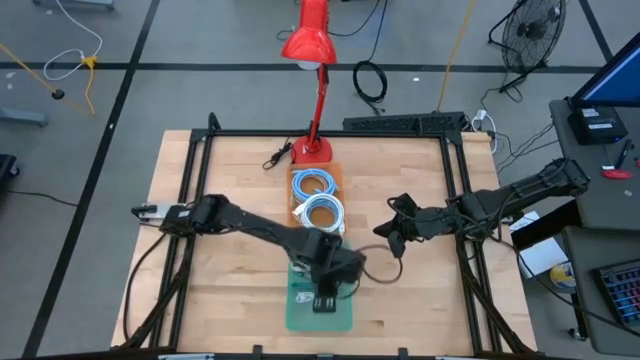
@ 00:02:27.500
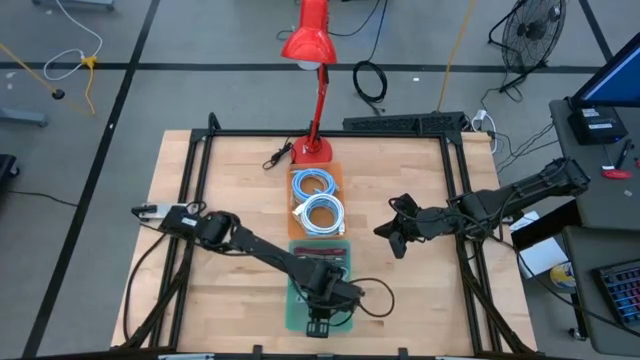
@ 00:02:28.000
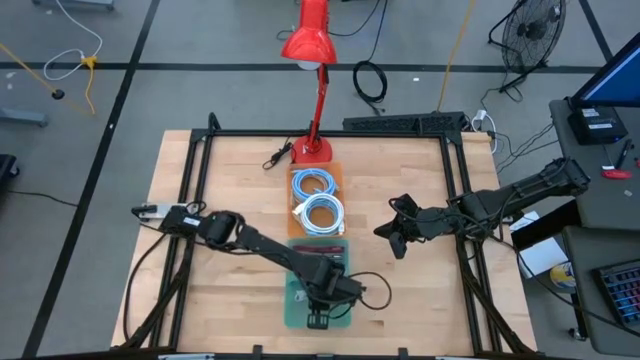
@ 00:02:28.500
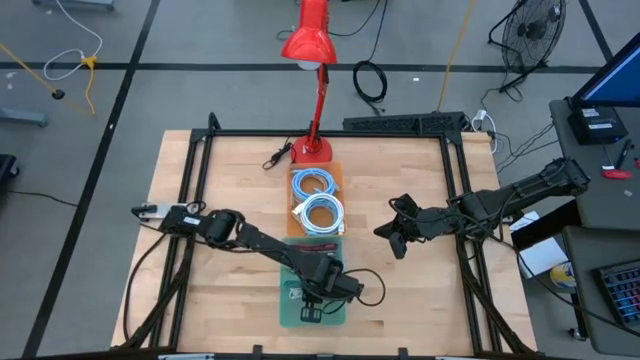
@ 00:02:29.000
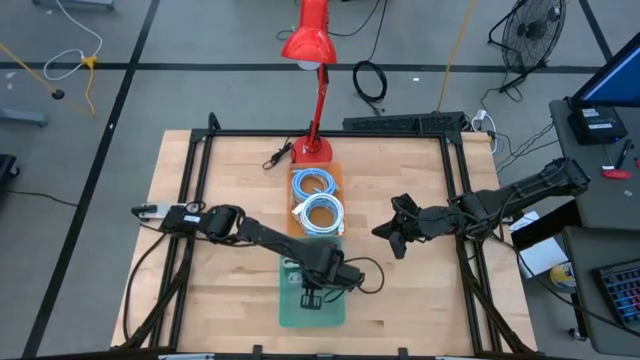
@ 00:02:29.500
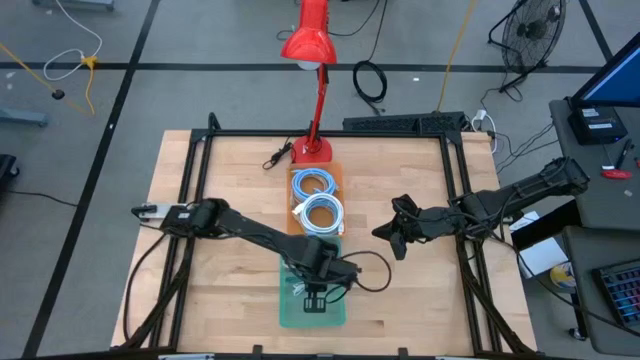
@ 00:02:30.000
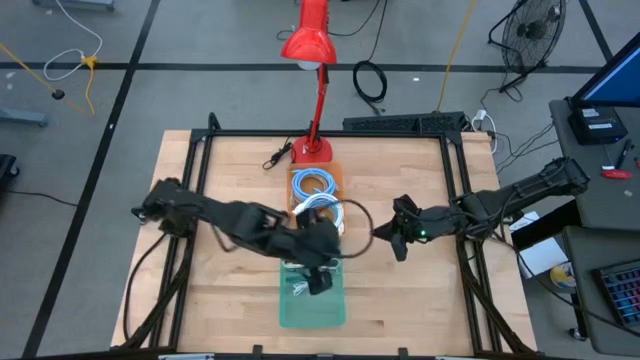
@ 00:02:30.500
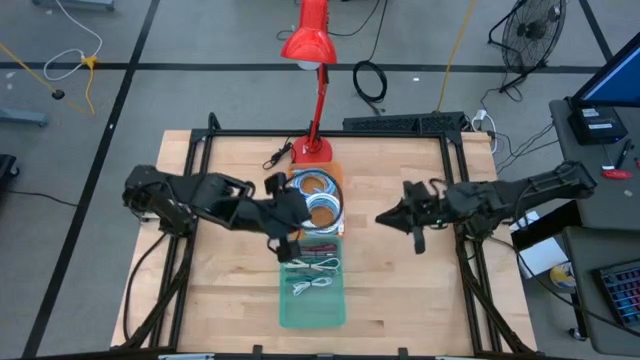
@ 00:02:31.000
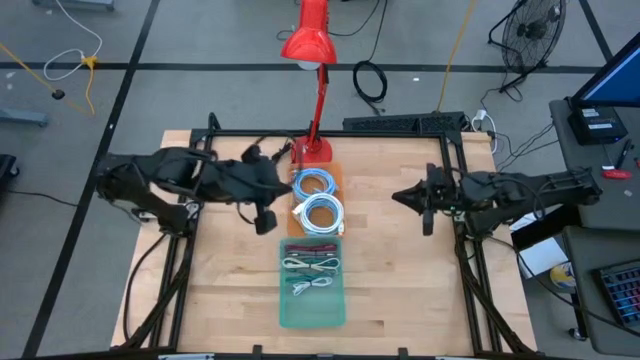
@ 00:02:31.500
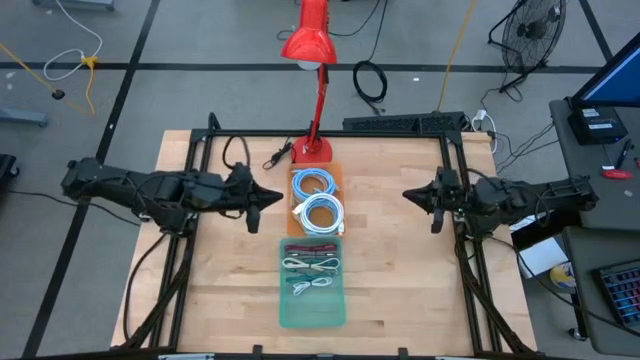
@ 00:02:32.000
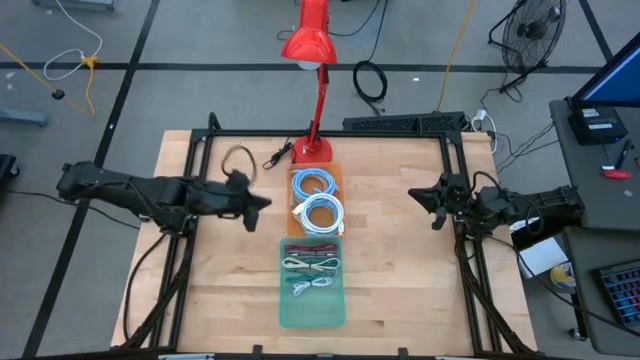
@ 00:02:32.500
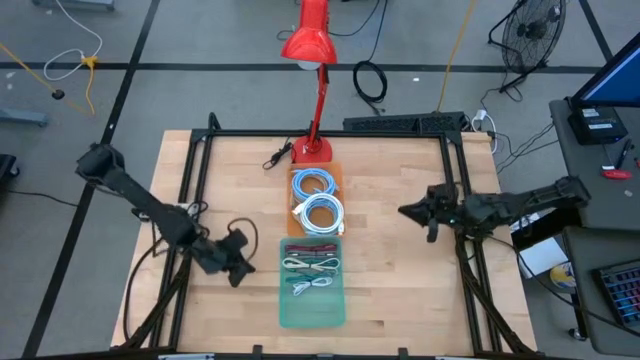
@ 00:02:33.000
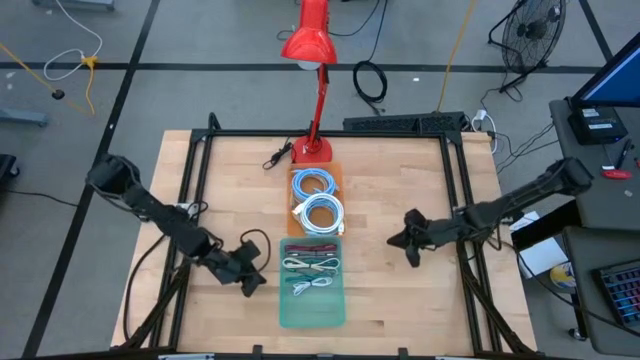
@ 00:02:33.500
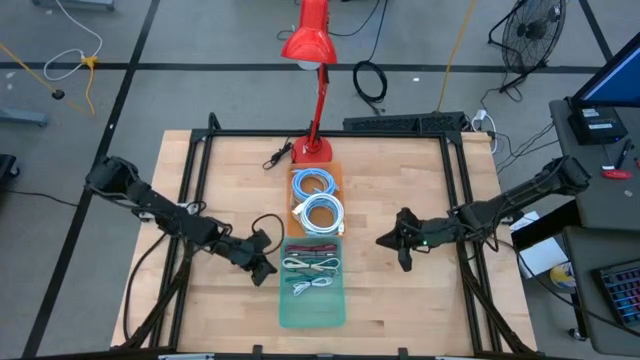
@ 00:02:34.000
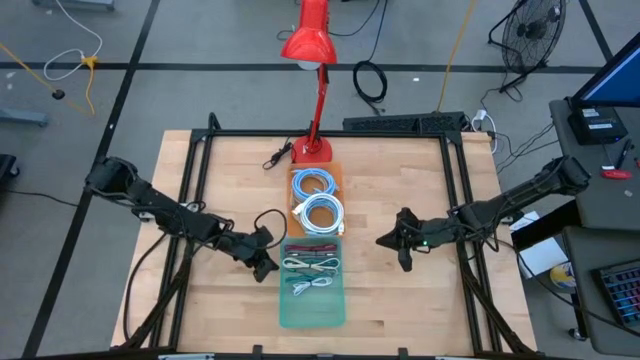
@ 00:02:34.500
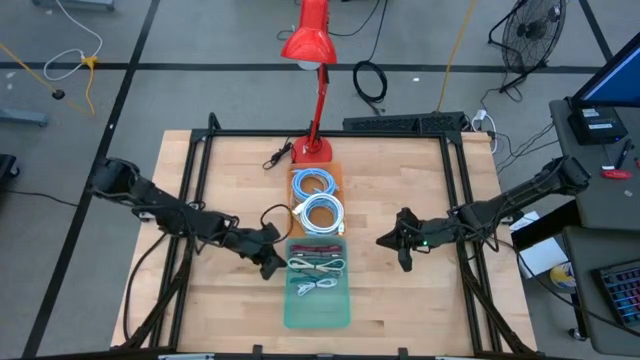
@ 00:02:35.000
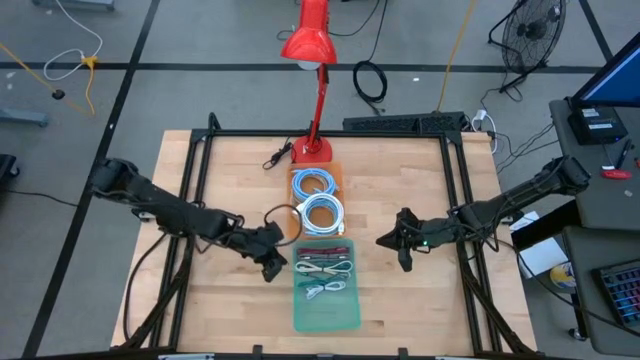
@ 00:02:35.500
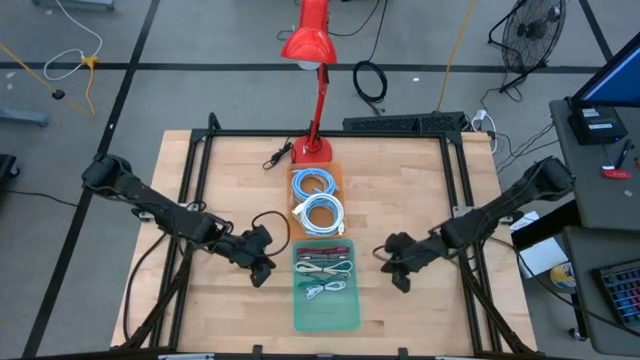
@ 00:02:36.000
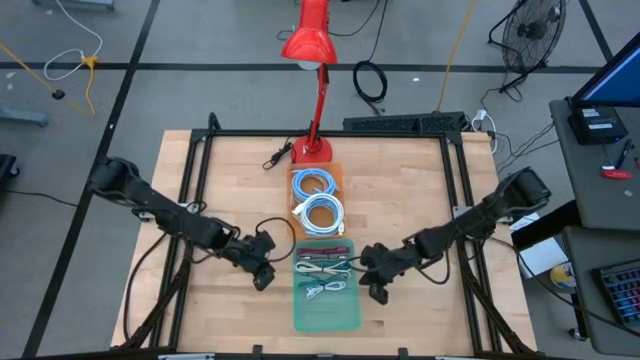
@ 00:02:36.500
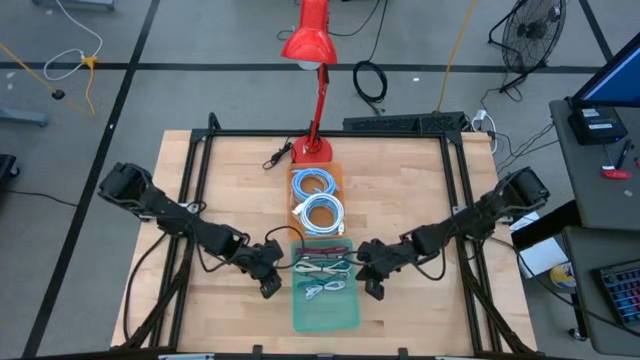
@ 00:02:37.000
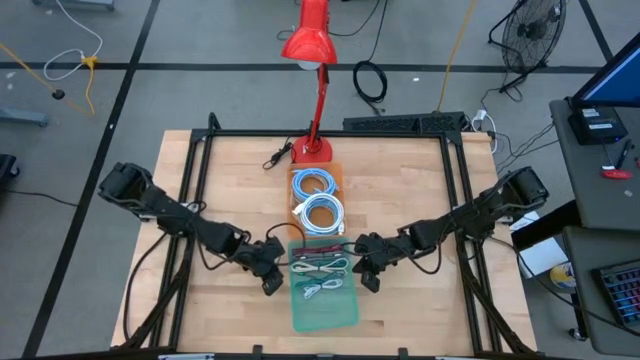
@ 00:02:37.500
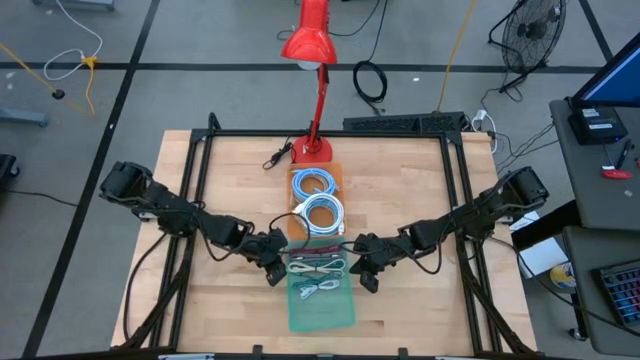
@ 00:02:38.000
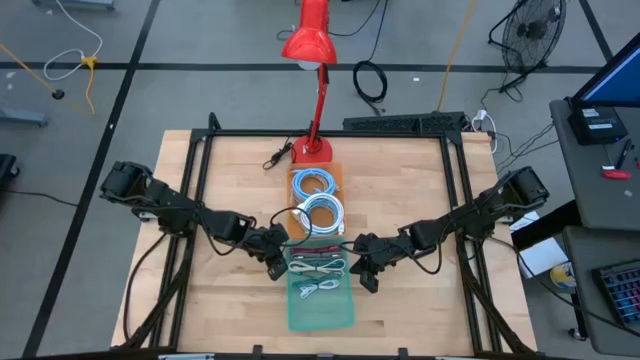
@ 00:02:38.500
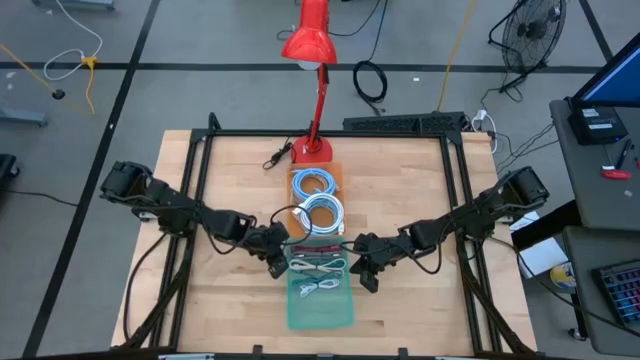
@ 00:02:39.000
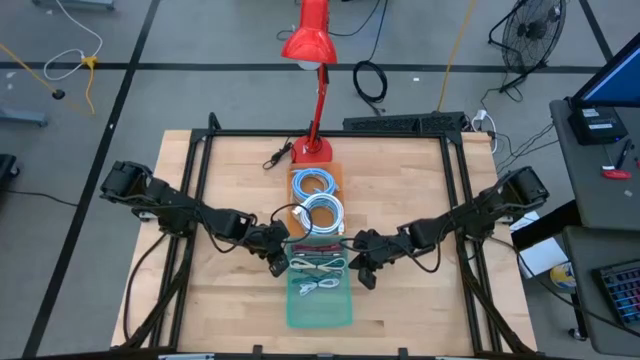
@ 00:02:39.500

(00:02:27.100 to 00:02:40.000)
Task: Sort cables
Adjust the blue bin

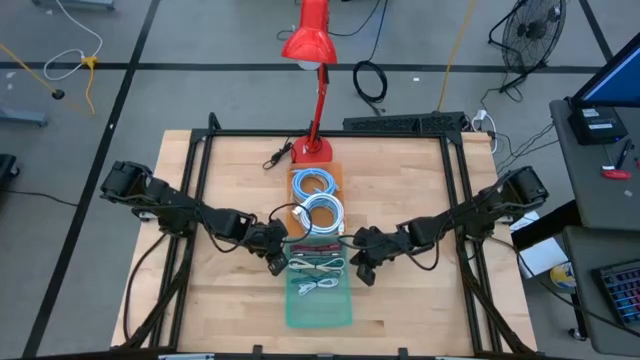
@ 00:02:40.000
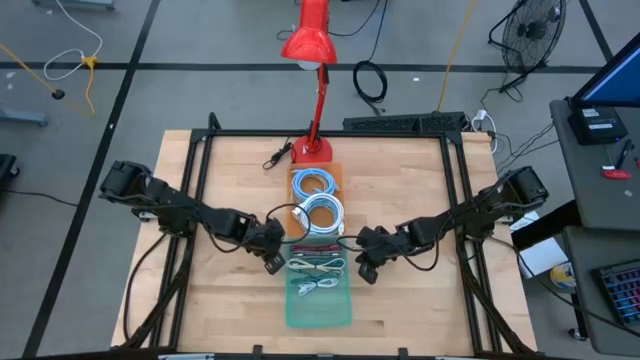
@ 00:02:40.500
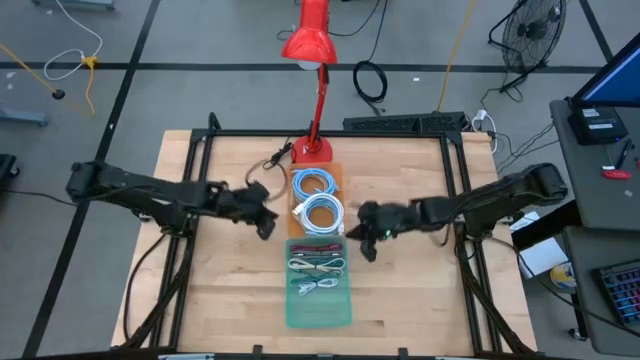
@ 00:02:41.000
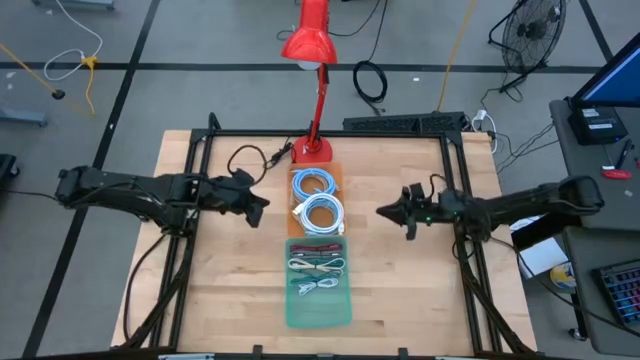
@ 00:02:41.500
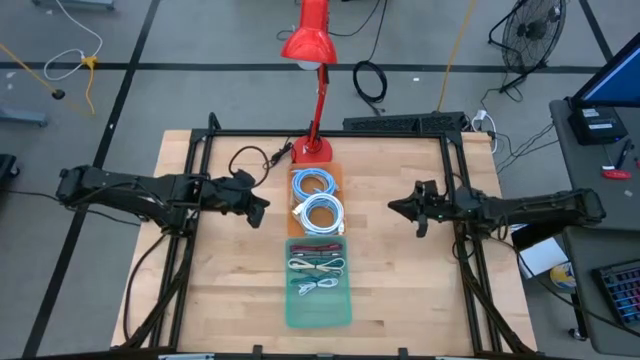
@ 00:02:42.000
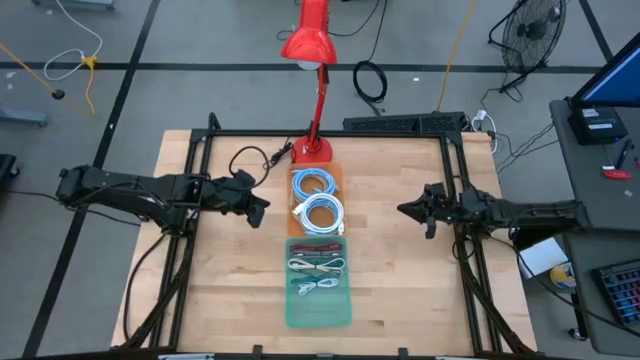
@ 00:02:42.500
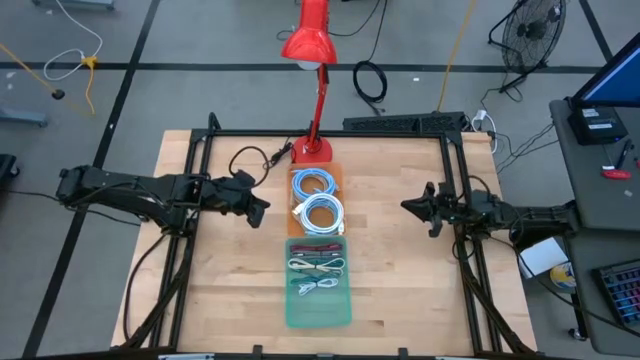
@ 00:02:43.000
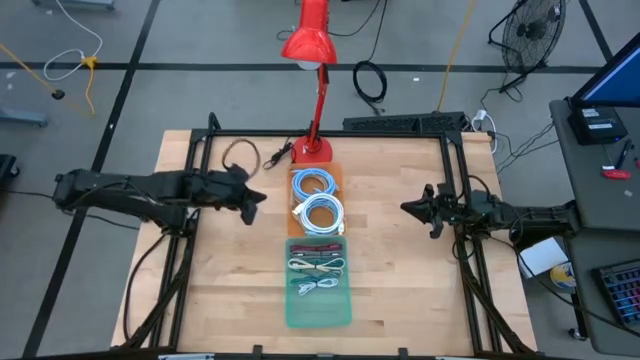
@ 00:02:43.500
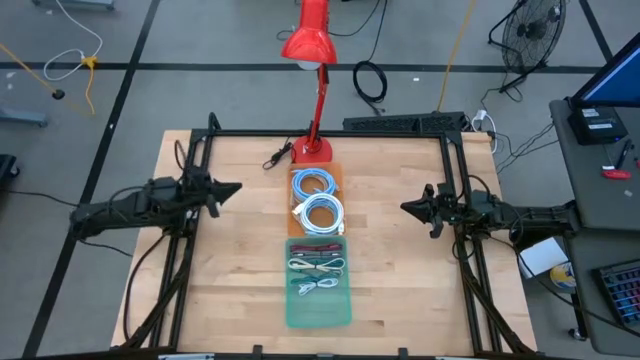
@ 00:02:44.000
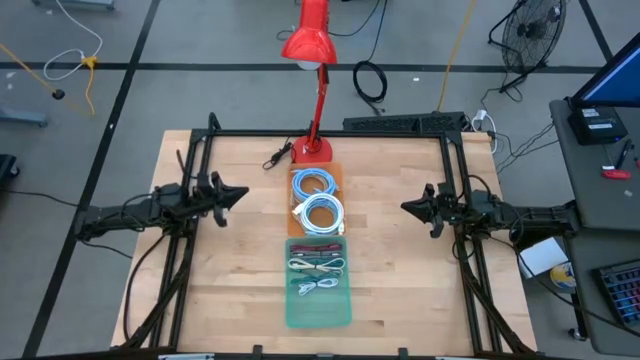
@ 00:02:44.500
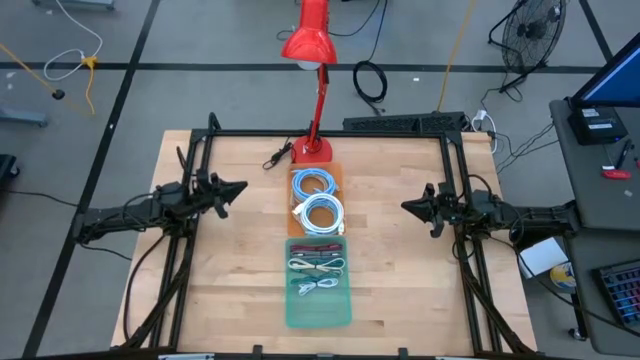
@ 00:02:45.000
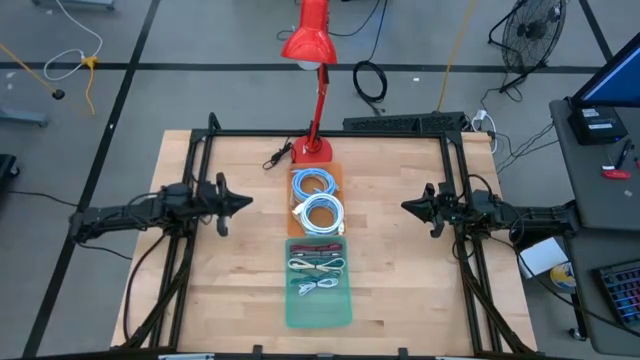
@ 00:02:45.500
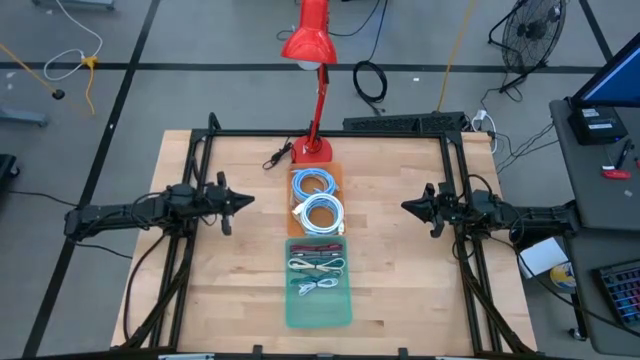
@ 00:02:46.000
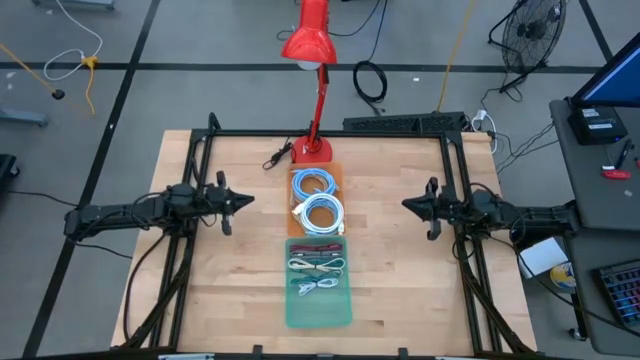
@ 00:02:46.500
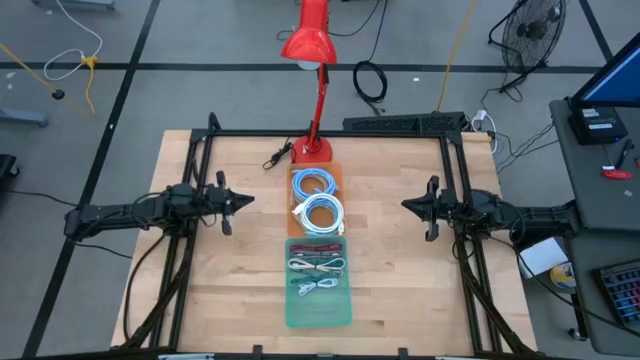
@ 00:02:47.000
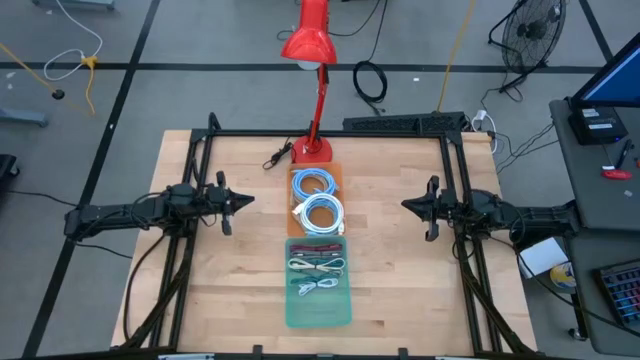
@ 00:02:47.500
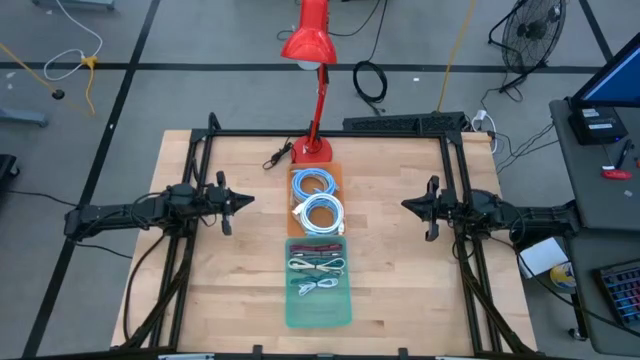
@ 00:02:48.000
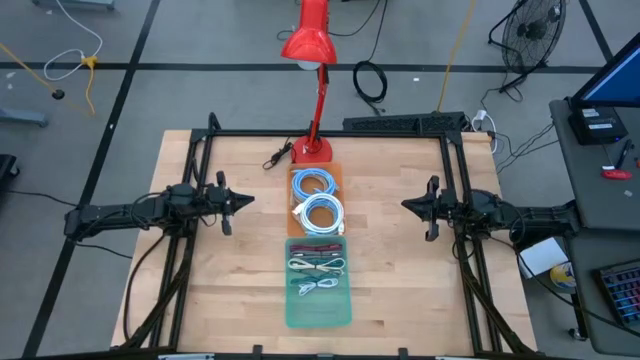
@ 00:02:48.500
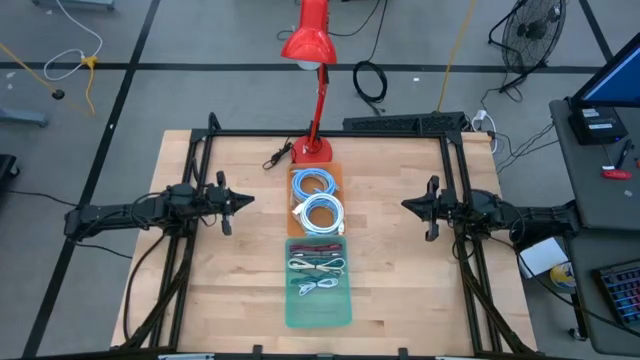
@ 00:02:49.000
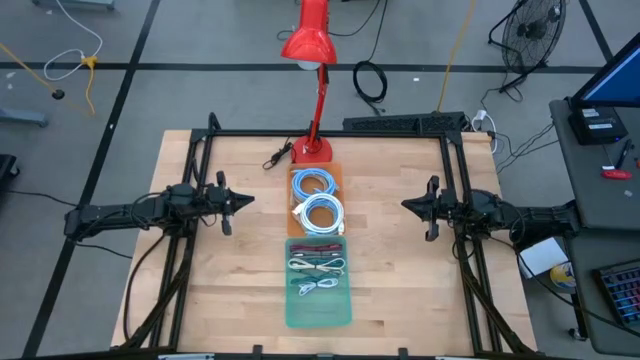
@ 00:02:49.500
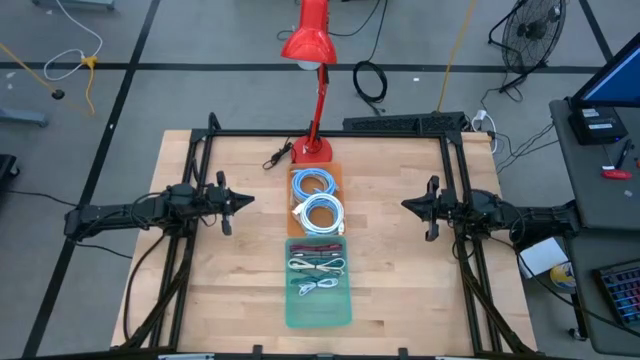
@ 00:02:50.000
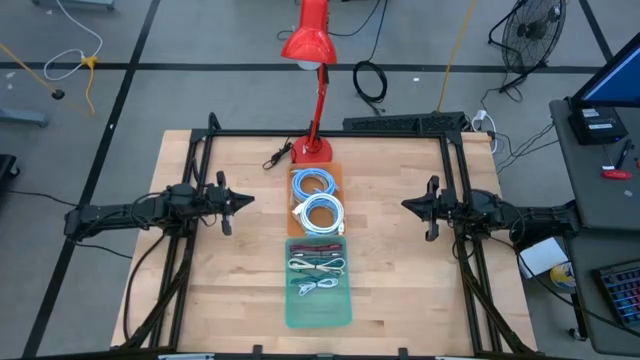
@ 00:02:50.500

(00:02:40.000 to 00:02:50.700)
Return to Home Position
